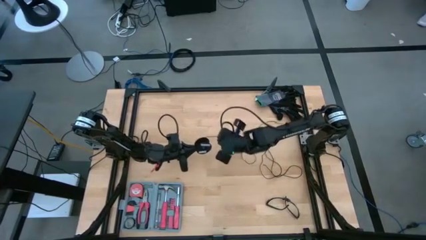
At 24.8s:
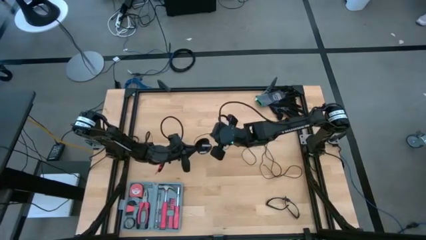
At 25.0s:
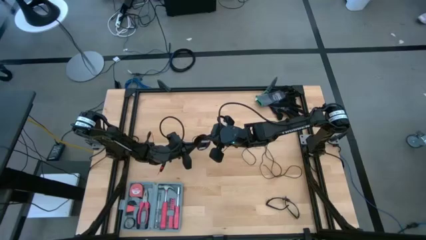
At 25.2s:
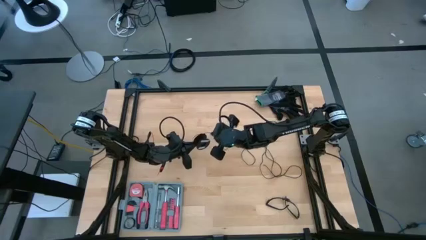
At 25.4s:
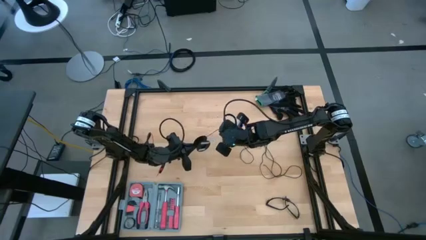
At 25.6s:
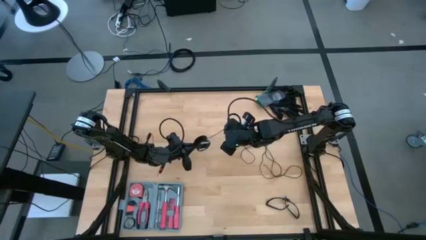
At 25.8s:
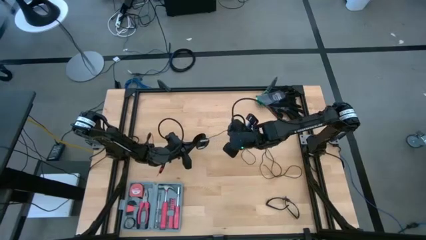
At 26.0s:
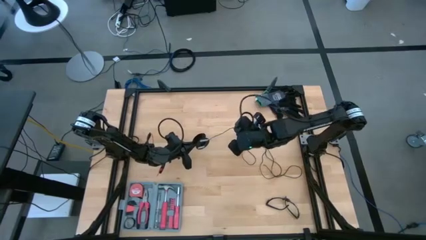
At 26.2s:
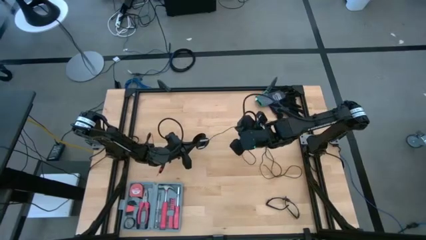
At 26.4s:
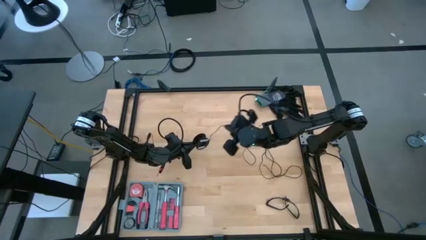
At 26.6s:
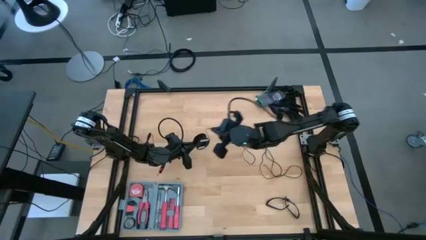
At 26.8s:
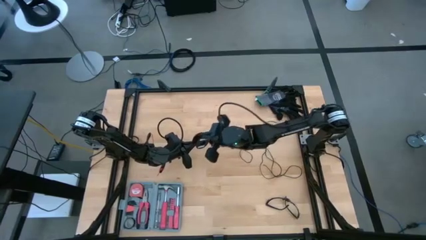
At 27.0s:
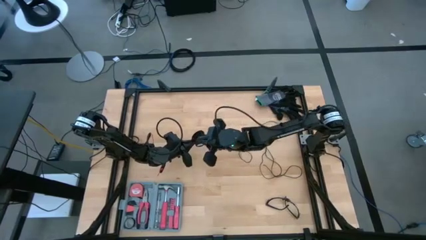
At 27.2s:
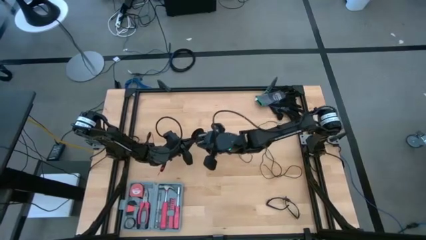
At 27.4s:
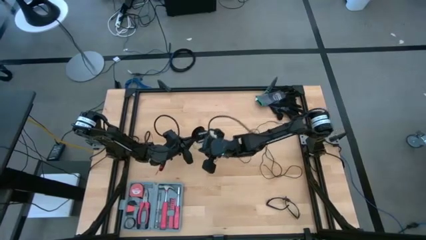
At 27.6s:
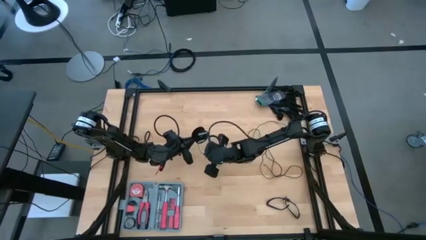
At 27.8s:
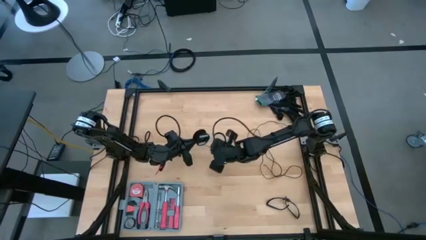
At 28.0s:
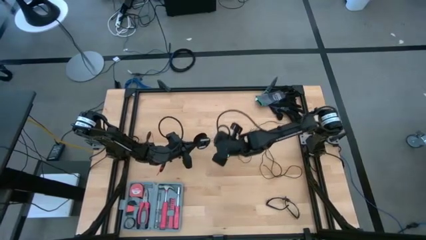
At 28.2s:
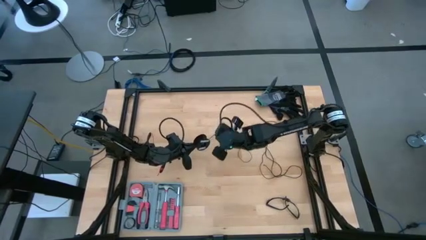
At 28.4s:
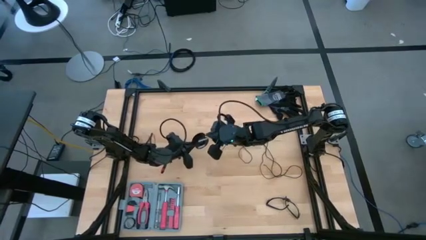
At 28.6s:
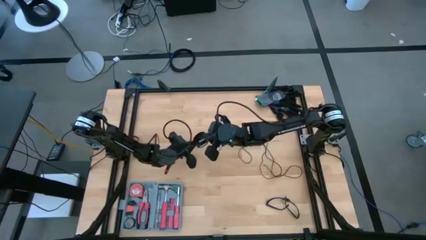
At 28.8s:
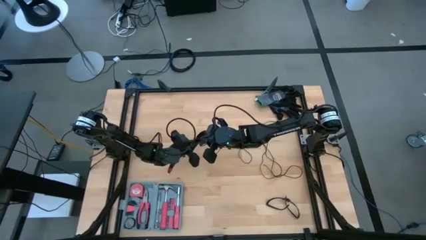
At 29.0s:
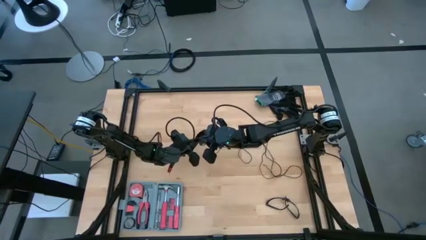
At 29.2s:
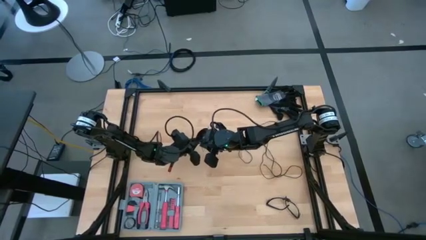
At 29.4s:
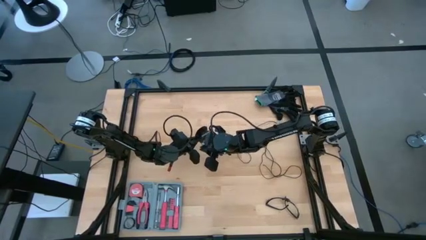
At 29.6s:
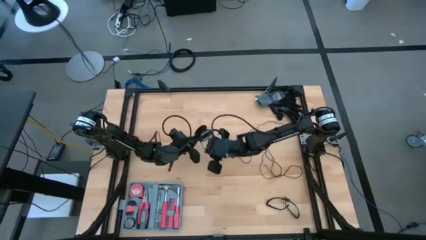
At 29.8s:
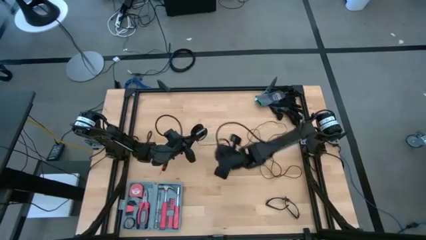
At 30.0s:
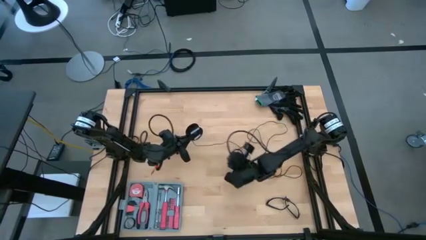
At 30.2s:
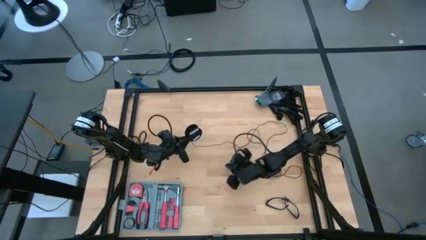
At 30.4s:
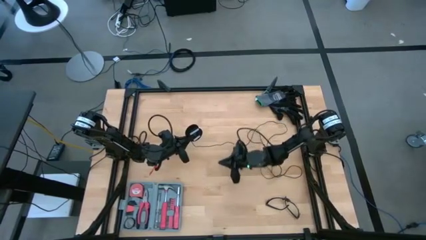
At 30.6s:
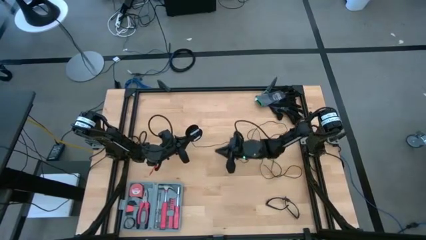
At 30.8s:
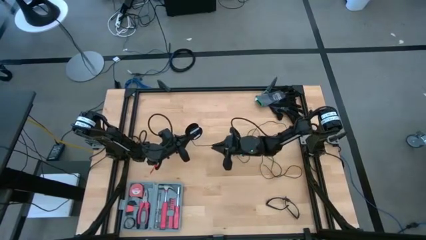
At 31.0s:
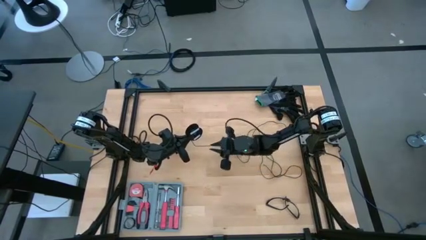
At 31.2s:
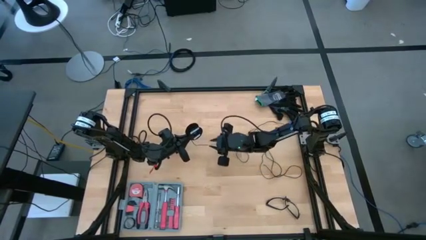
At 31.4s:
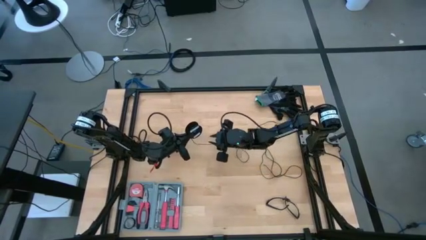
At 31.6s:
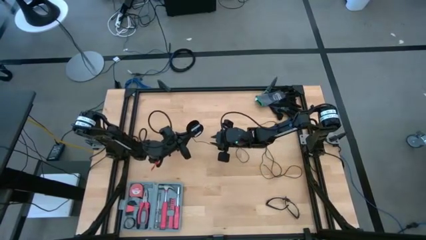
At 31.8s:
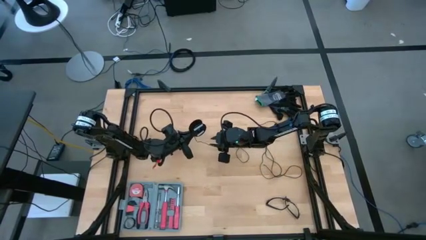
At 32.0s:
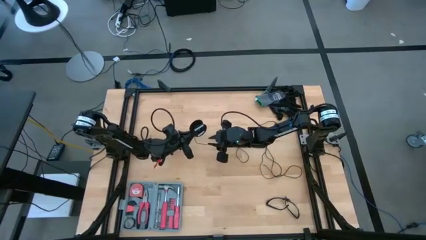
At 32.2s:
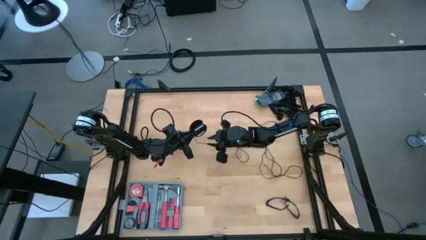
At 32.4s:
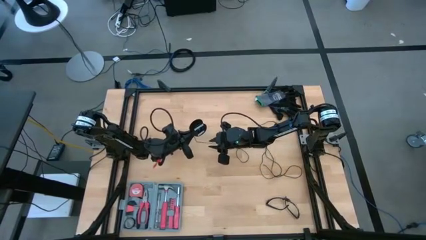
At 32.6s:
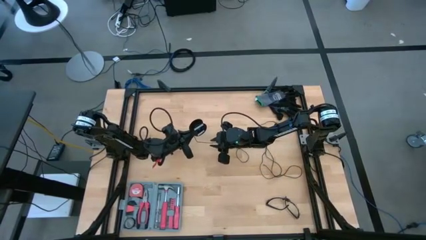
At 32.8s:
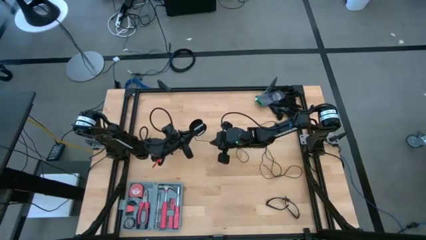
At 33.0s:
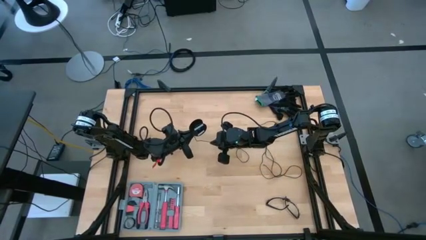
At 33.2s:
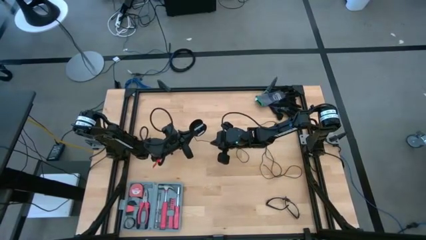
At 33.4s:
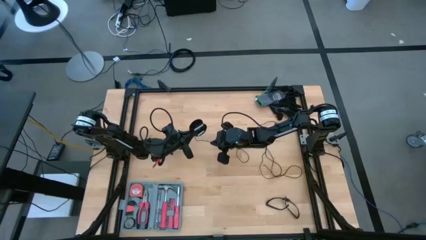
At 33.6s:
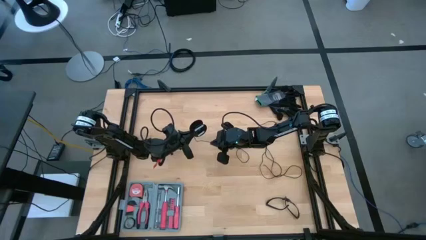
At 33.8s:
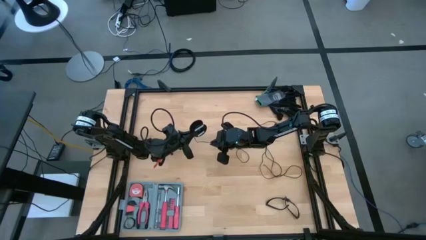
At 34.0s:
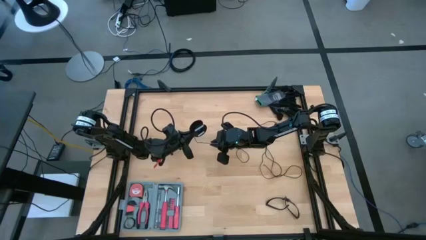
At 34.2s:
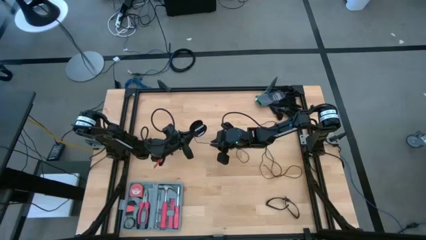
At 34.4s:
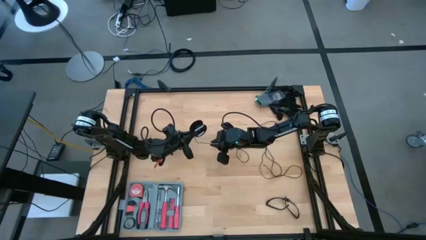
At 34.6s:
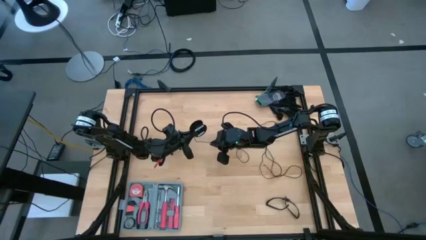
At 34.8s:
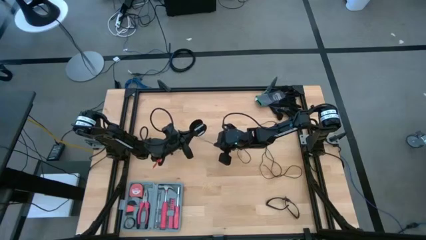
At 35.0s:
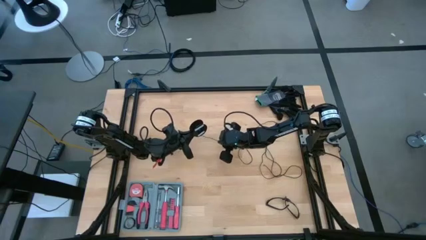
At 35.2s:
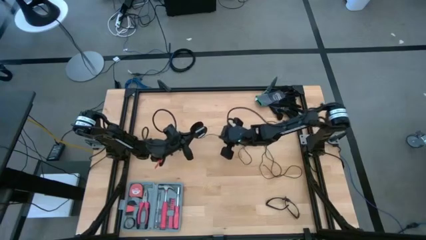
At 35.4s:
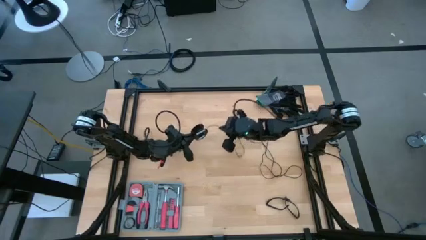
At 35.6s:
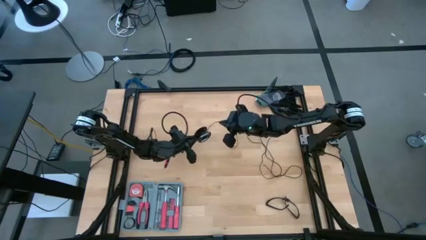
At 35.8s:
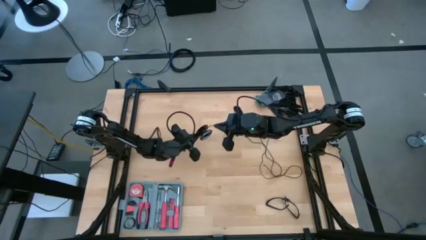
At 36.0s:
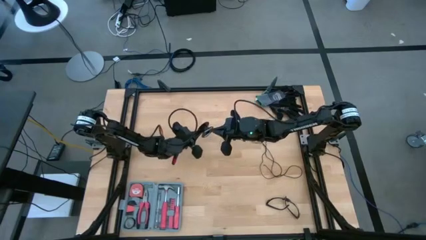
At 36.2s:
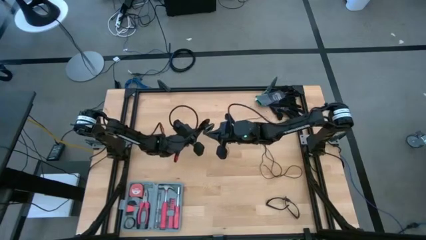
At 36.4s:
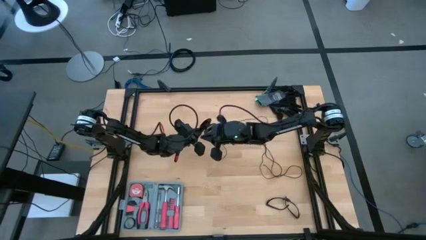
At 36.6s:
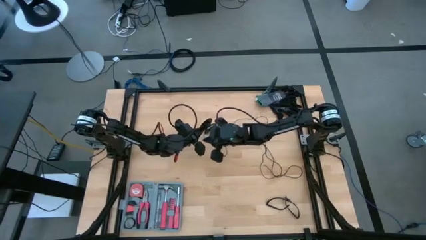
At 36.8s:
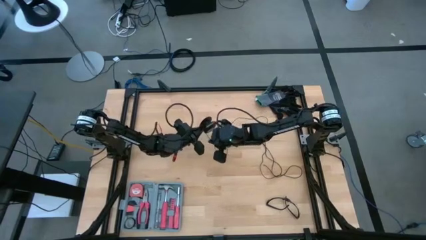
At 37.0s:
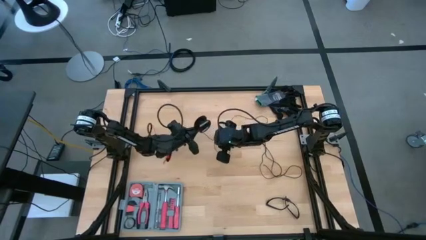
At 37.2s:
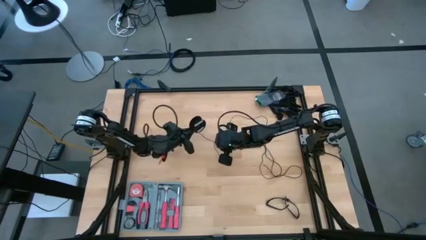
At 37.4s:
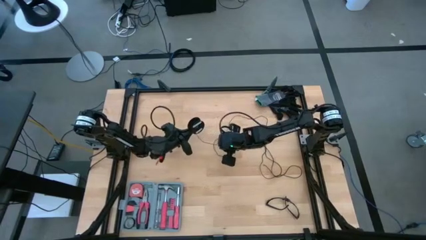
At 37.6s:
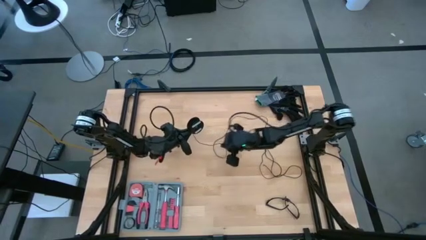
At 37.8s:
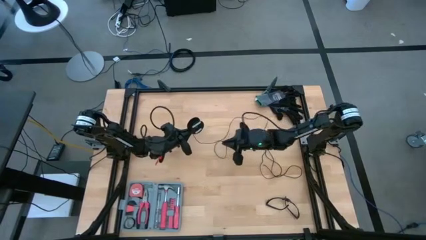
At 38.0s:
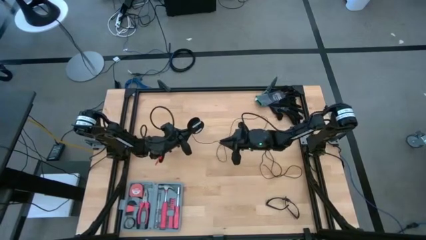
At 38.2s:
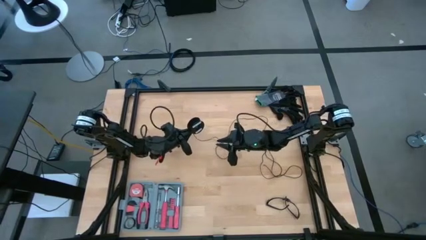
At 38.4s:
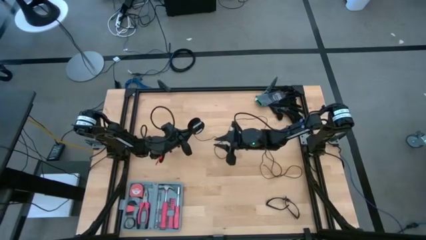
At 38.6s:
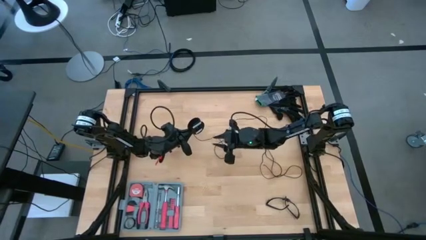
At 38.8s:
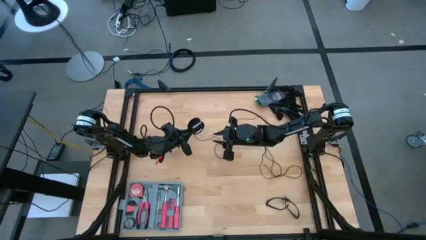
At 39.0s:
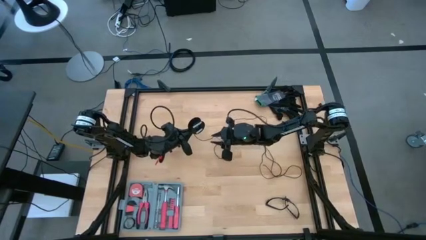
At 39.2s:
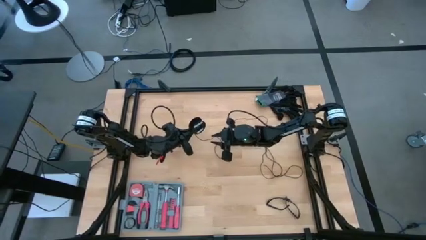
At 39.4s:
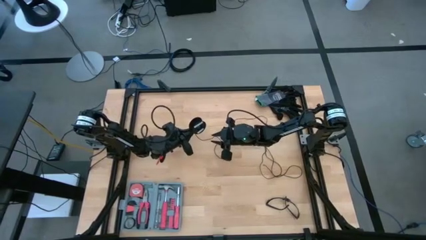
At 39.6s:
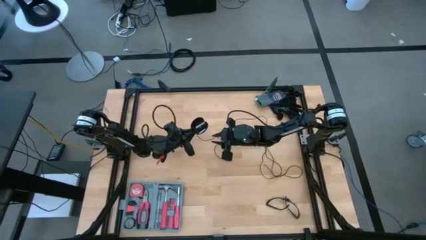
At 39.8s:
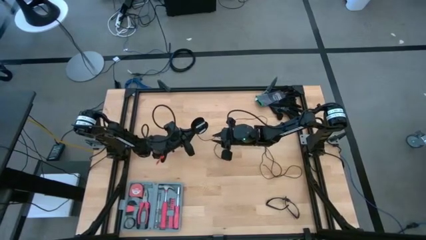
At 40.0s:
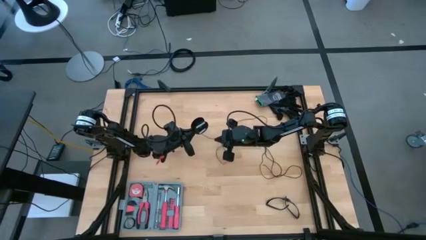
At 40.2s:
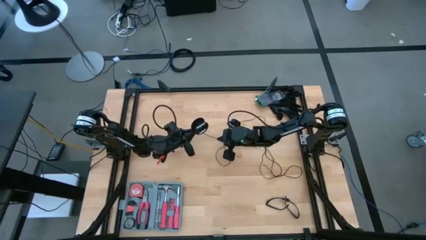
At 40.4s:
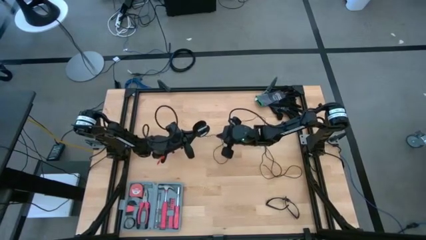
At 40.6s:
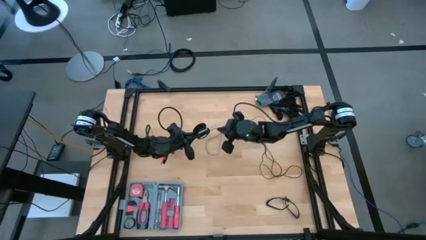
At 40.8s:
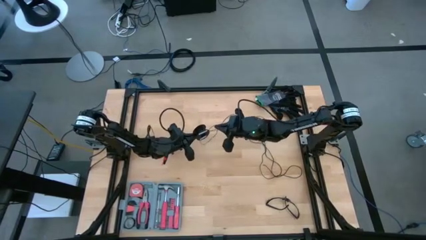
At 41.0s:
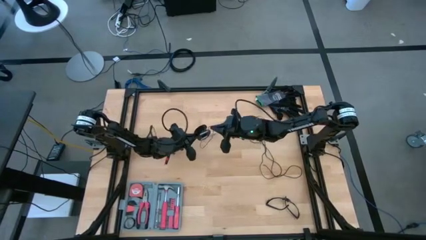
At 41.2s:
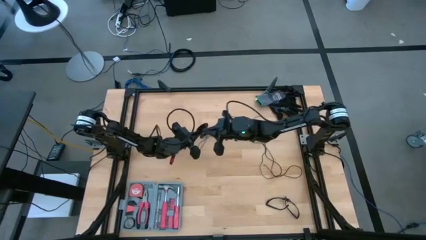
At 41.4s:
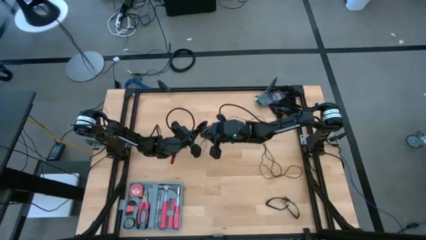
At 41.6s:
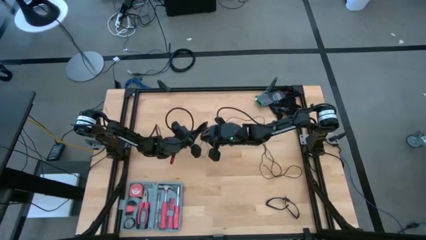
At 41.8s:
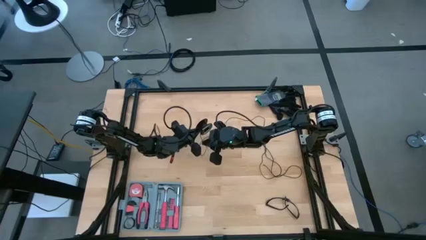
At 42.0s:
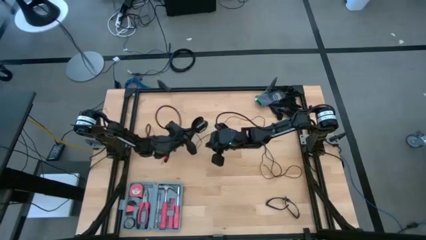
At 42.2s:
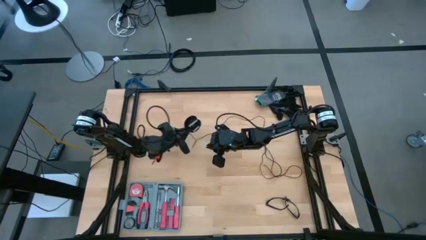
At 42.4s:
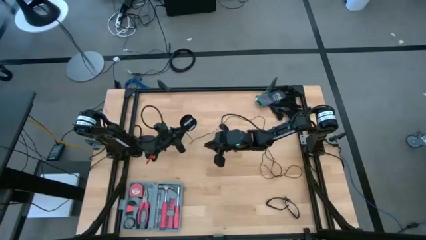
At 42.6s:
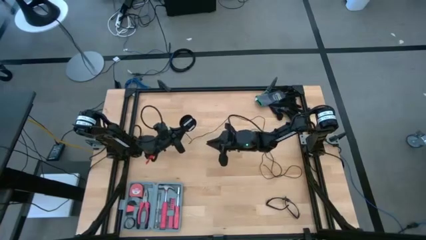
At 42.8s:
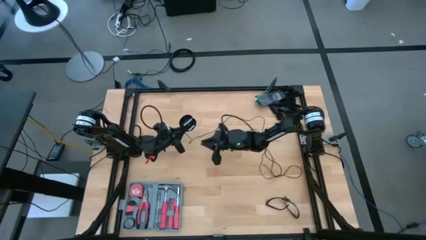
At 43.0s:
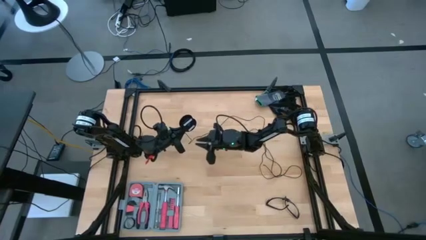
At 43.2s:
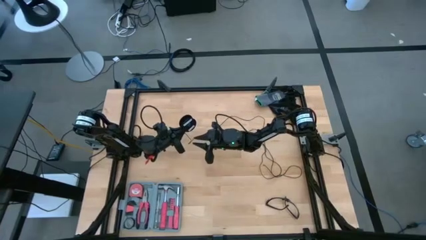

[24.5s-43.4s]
Task: Coil cords
Coil the black wire onto the spool
